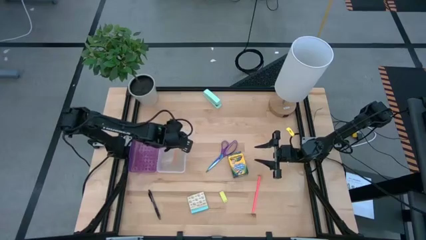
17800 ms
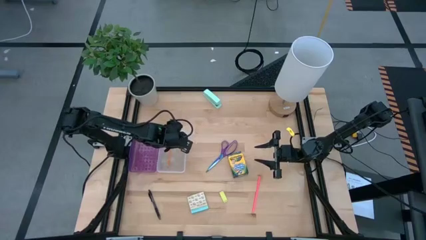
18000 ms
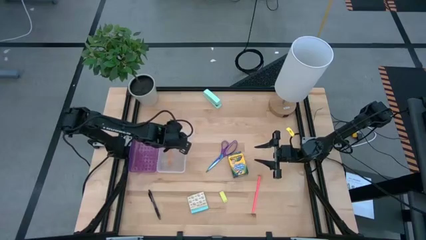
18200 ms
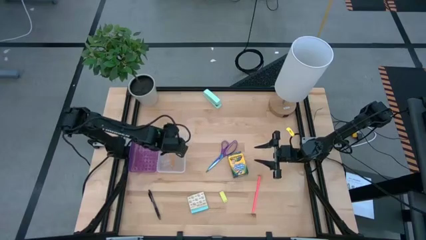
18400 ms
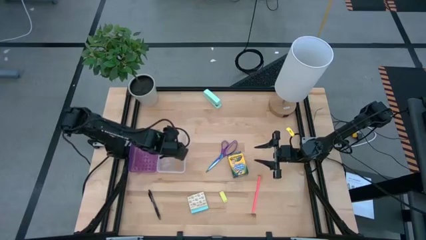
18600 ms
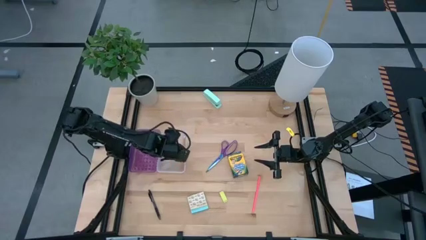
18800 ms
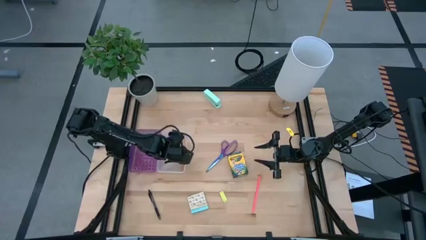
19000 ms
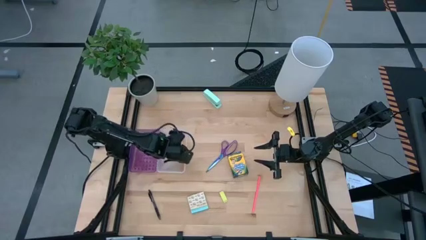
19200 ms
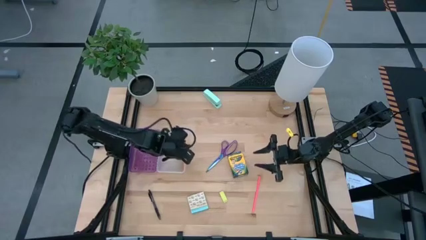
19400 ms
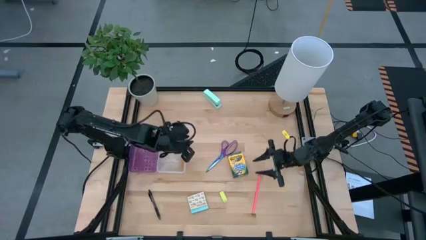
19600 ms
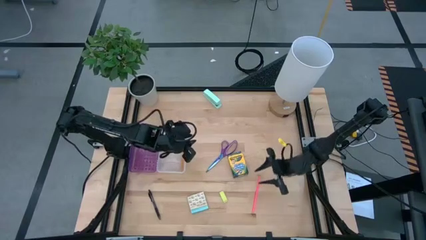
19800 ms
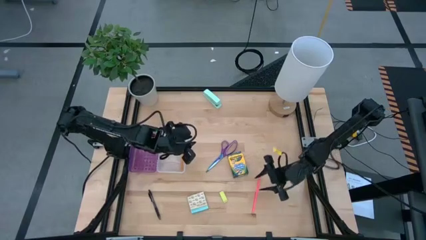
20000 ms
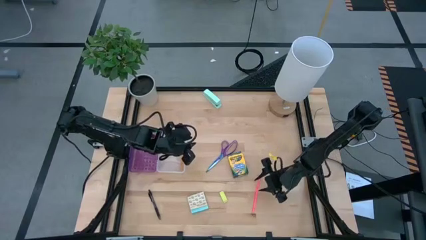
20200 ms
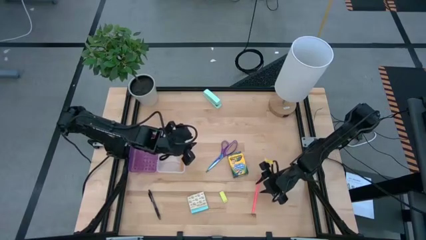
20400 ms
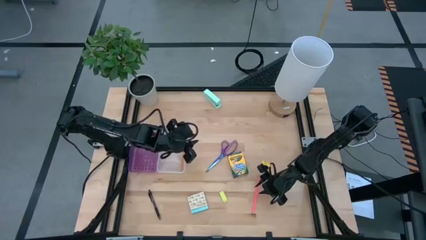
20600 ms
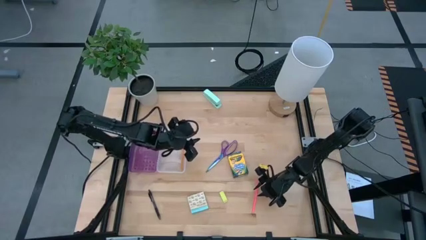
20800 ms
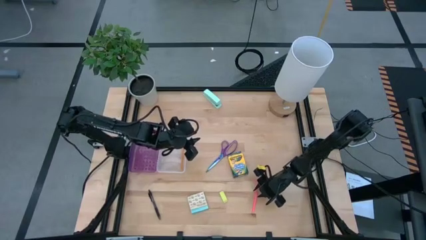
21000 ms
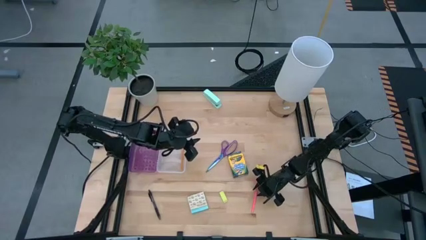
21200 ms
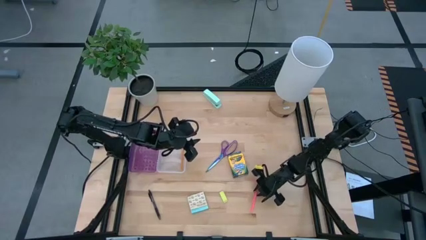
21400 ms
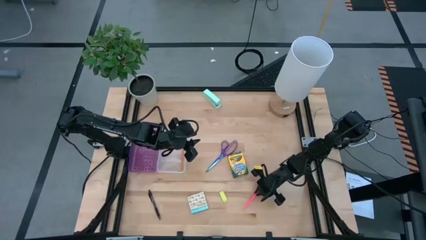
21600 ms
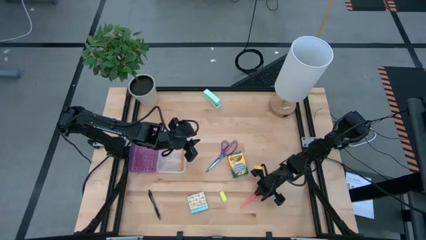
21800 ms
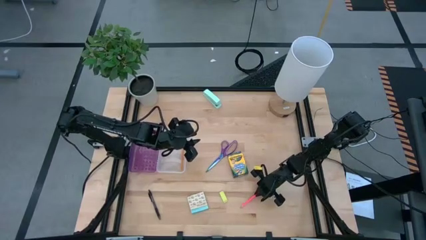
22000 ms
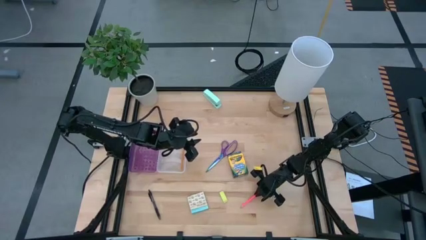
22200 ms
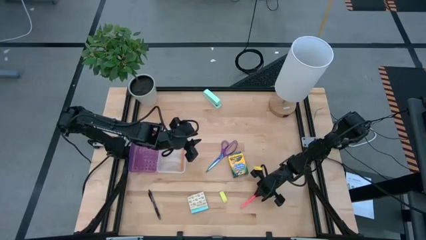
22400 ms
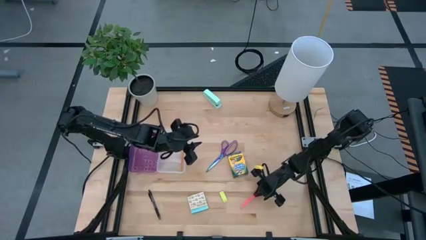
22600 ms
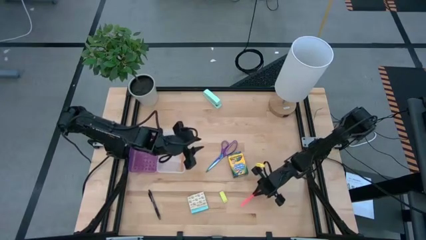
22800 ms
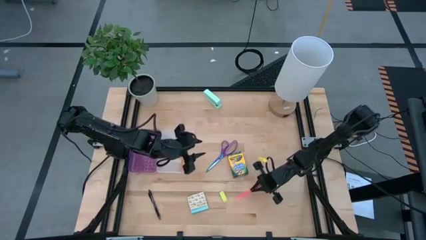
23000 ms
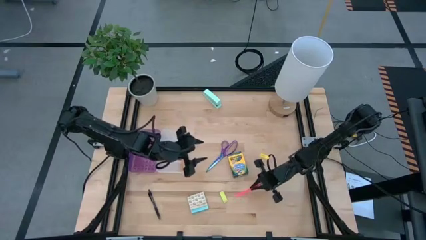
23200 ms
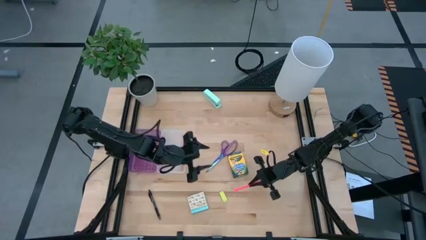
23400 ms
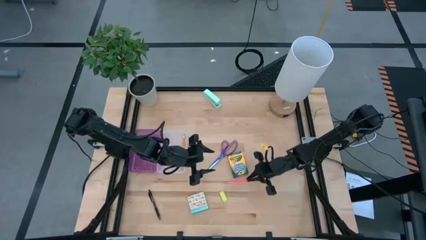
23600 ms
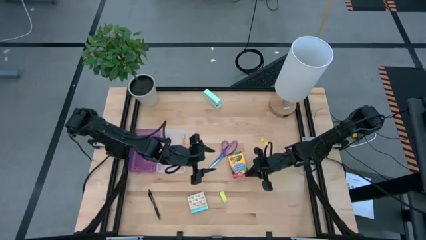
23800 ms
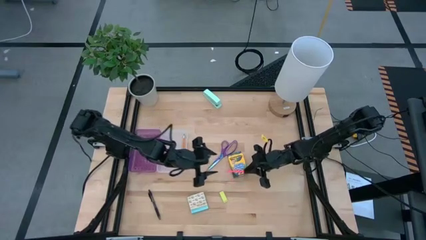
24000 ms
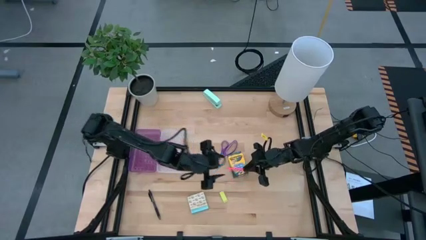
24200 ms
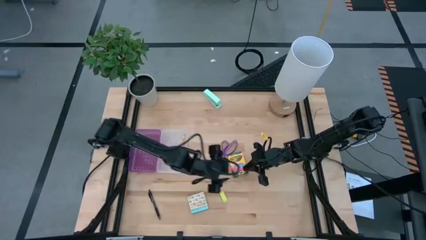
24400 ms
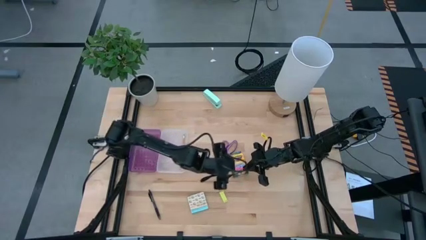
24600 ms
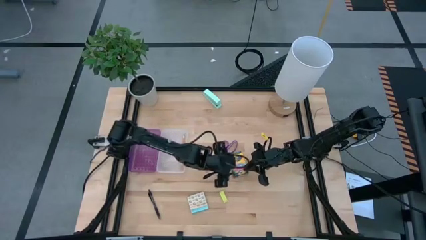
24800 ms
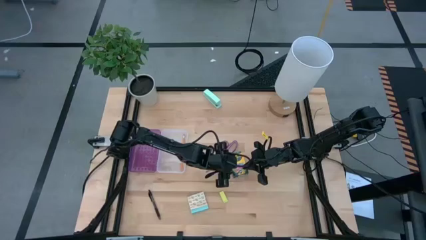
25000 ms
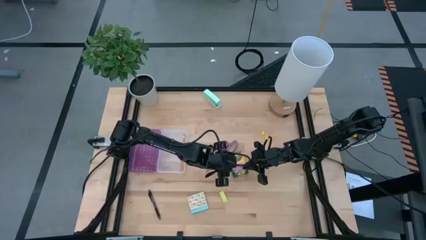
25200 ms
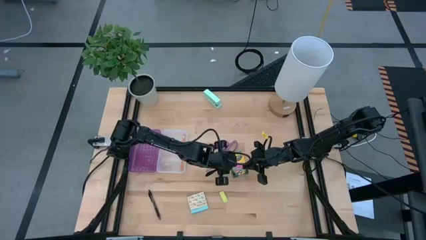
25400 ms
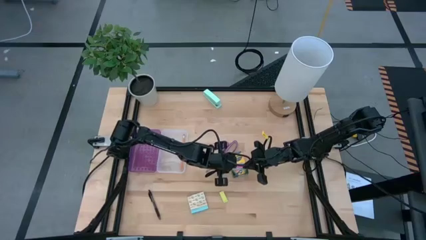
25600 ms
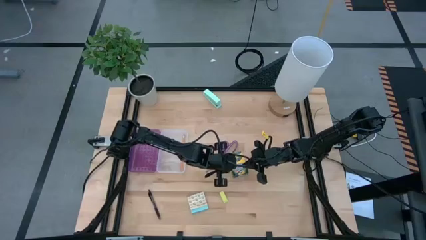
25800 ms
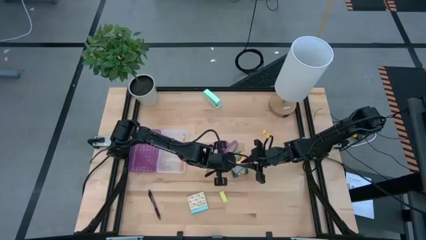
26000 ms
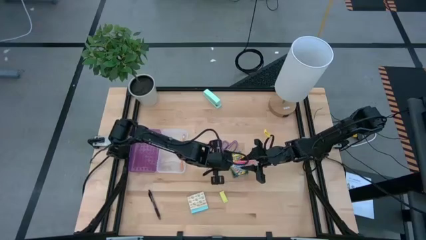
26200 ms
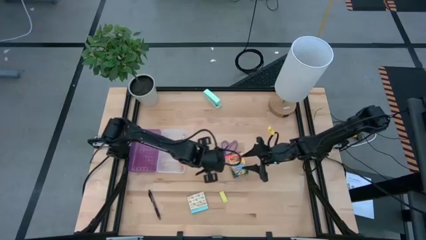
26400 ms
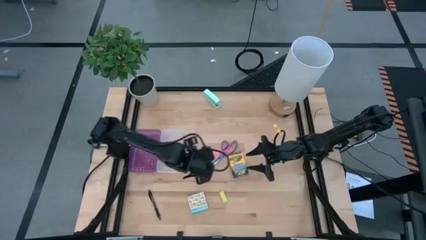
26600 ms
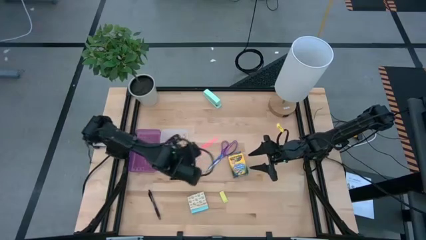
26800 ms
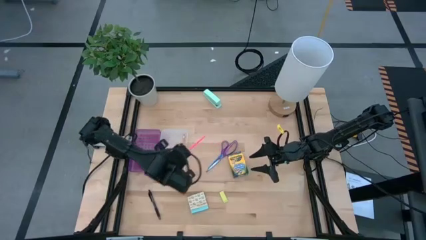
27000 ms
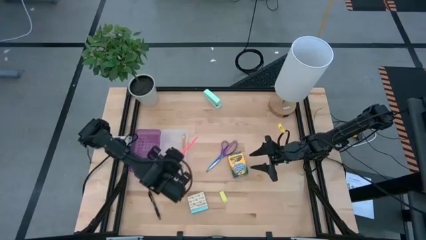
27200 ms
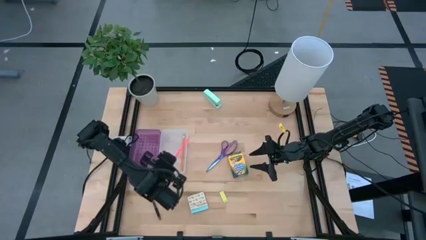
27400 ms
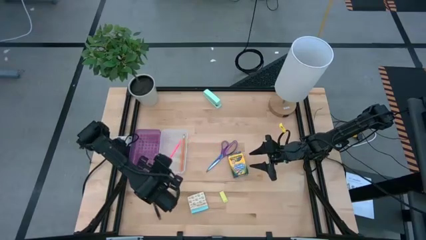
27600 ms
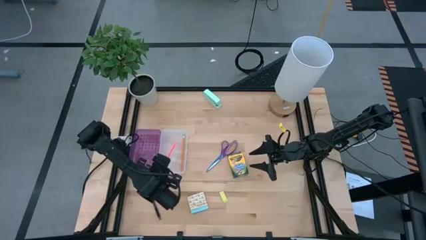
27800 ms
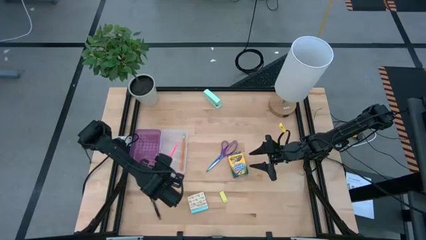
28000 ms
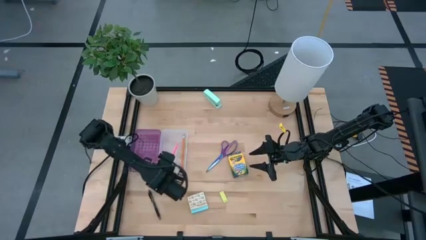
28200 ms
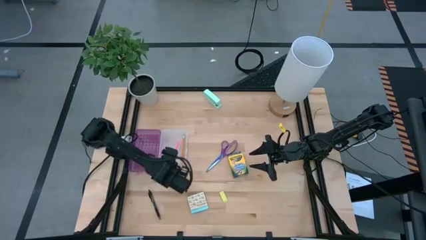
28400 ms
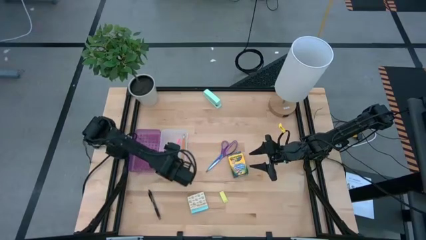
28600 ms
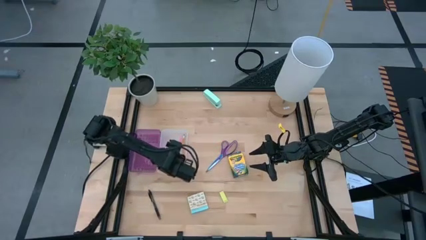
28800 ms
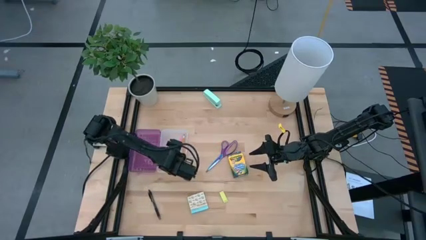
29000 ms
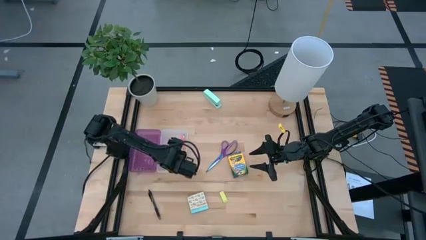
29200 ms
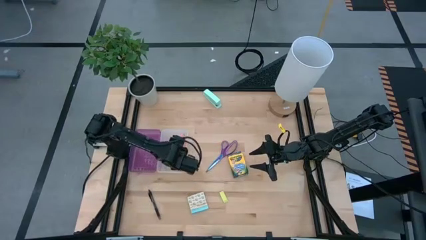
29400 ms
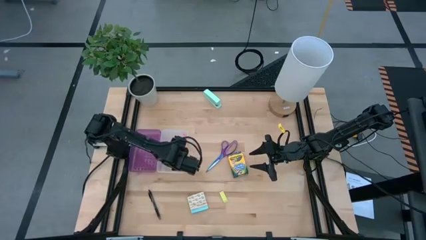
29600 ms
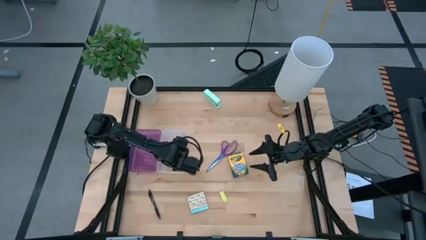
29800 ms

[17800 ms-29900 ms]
Task: Pack school essentials
Put the pink pencil into the purple supply box
